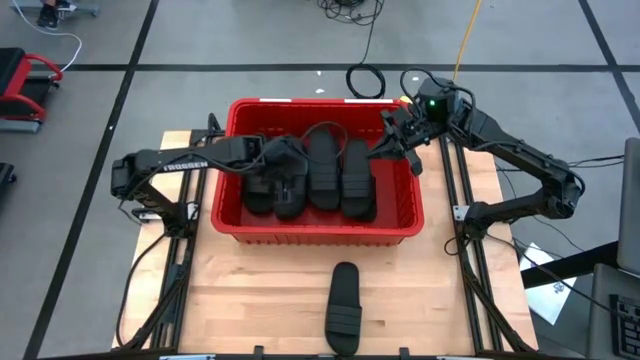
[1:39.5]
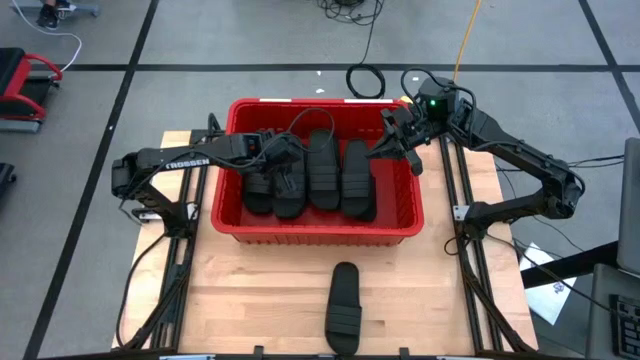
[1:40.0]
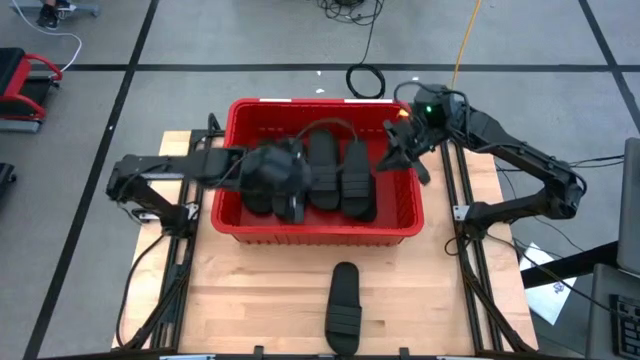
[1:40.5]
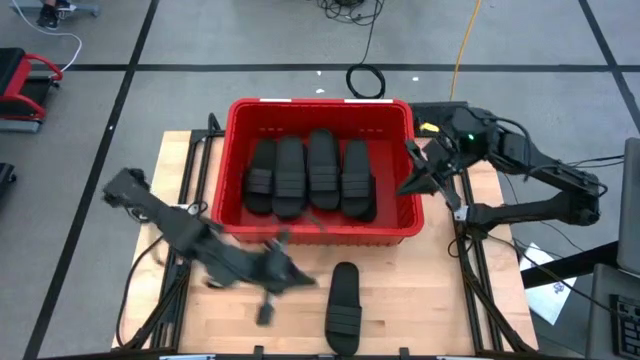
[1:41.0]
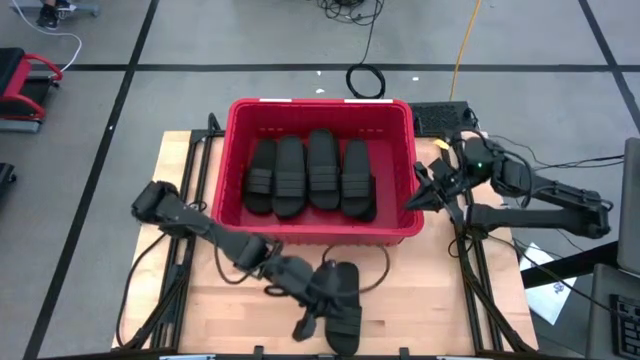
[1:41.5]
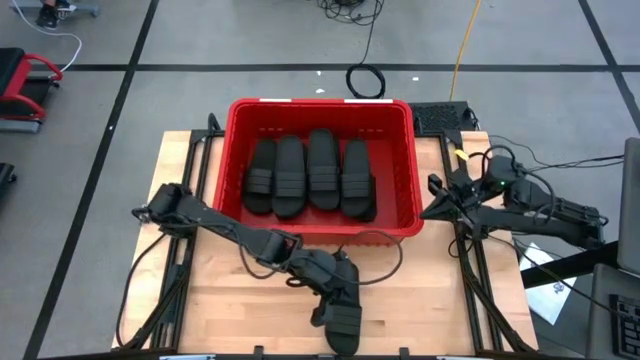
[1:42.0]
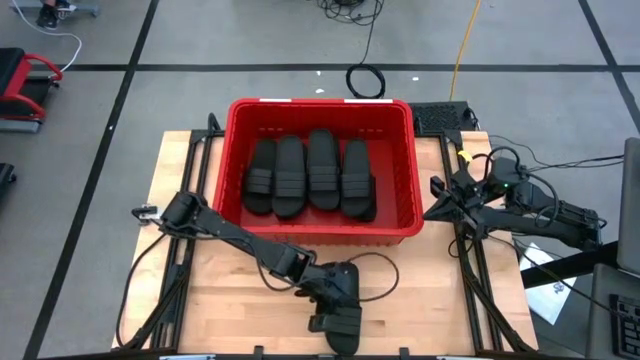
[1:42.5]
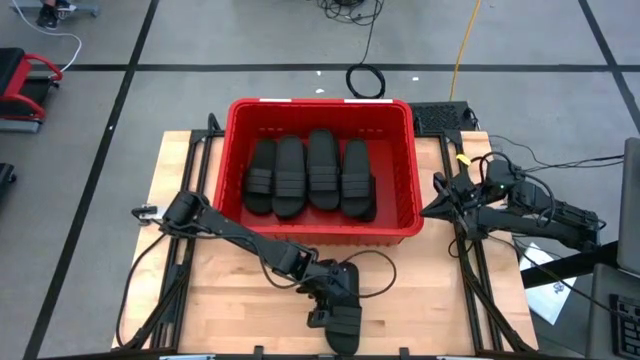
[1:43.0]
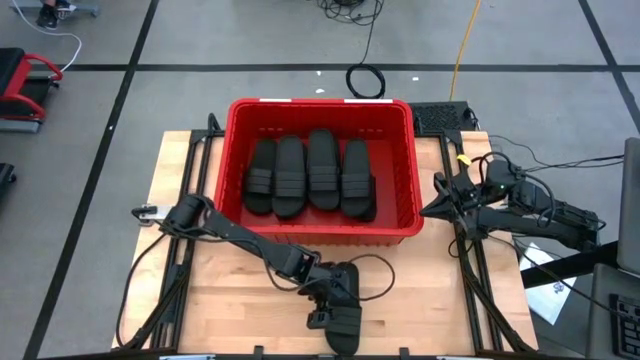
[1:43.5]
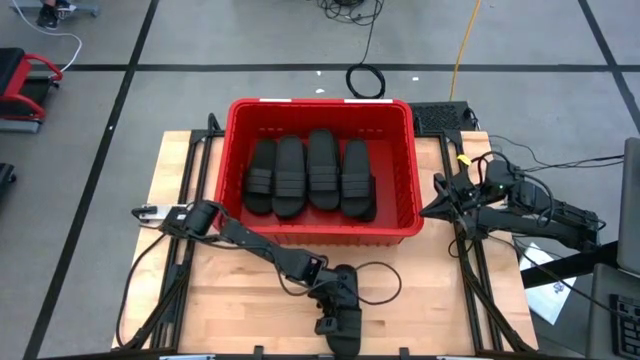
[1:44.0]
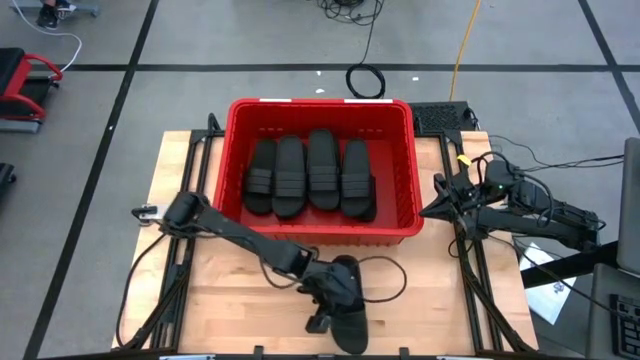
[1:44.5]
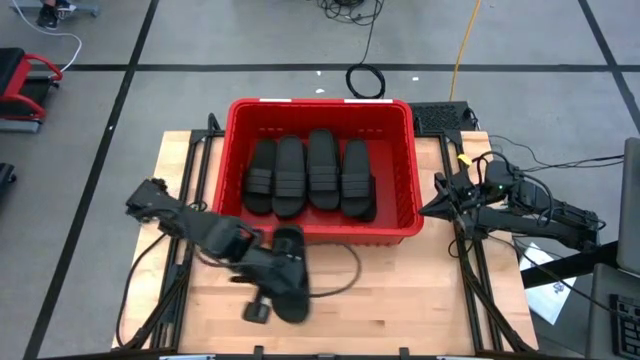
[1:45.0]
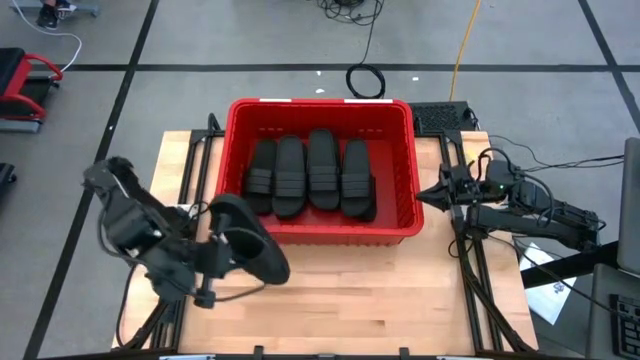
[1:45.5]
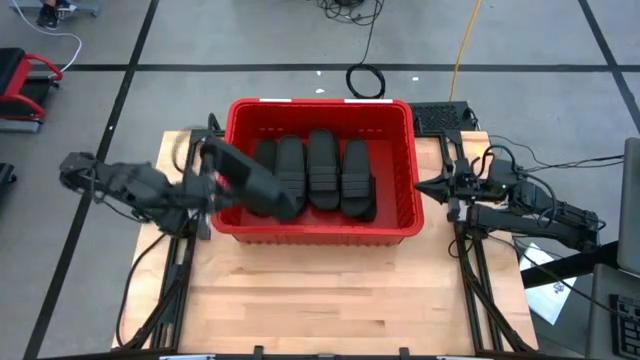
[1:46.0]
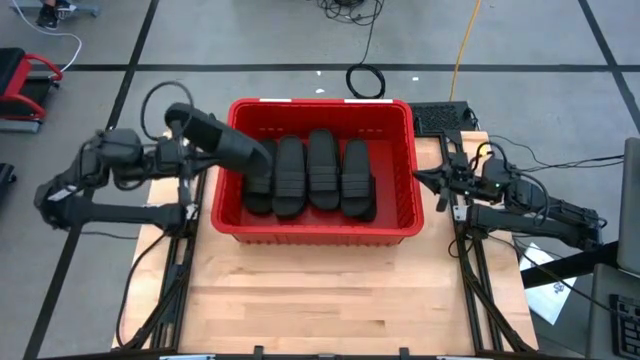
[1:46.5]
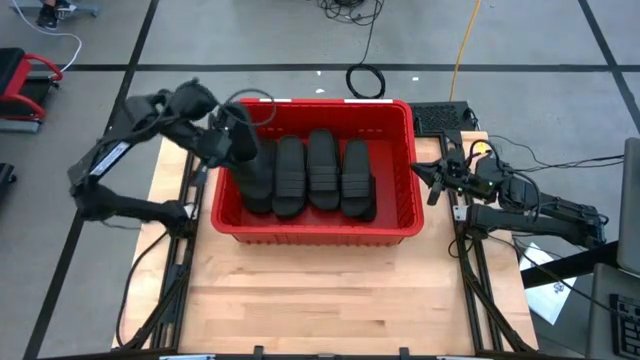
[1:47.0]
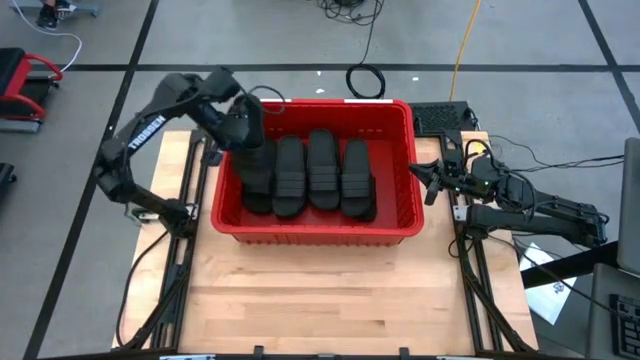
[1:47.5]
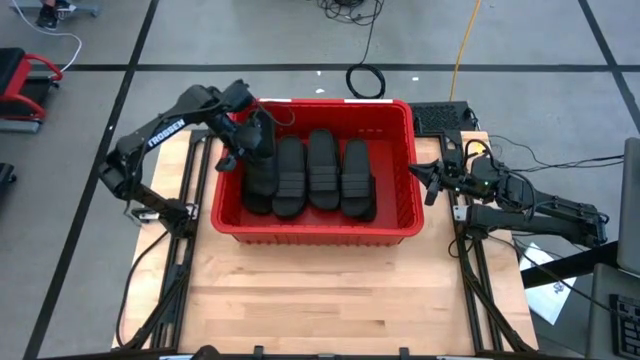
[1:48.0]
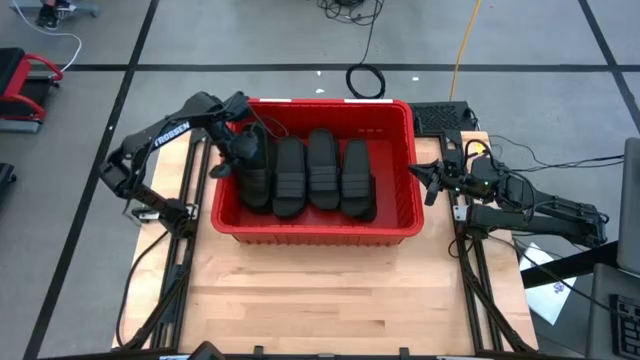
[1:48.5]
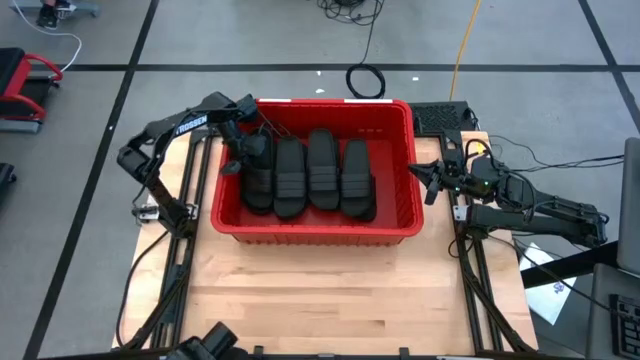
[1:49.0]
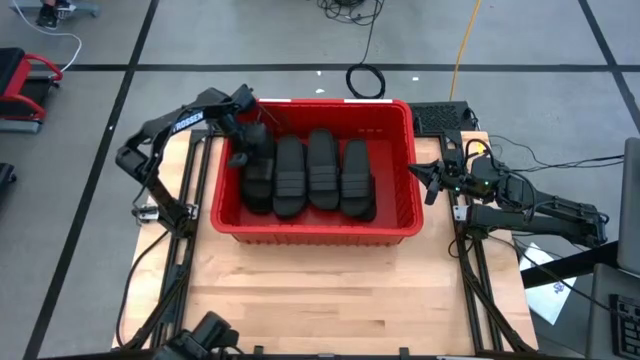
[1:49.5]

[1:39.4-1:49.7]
Task: Pick and place slides into bin
Put the black slide into the red bin

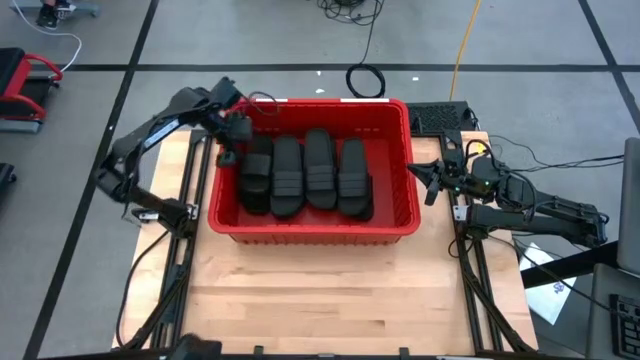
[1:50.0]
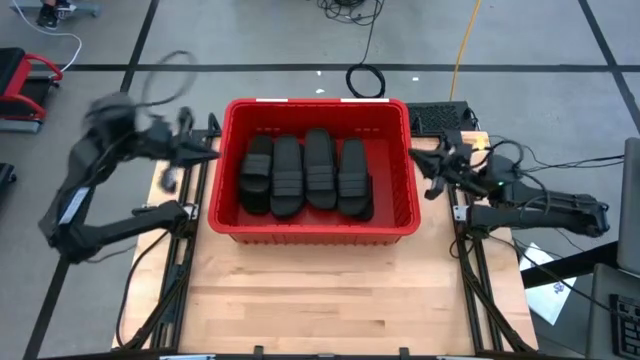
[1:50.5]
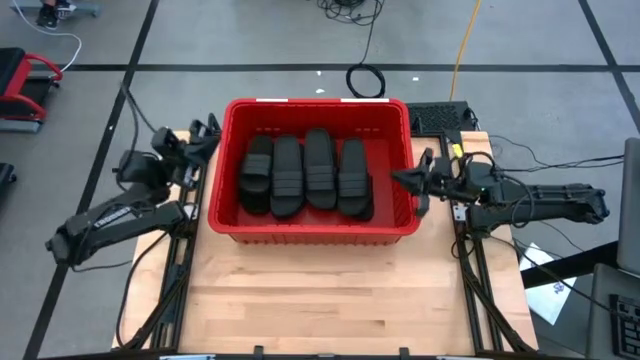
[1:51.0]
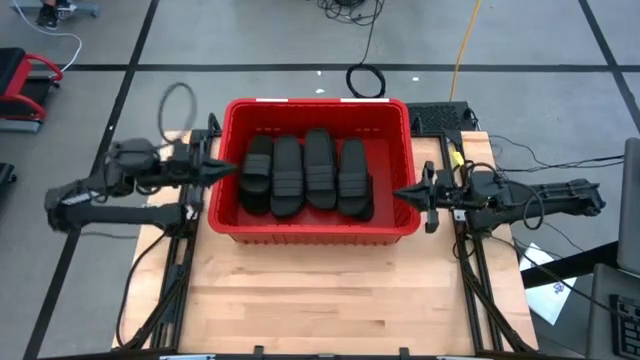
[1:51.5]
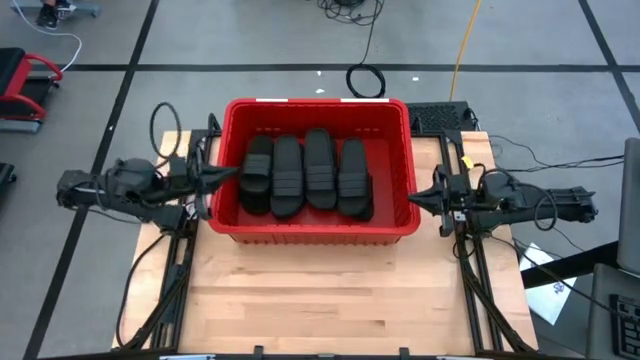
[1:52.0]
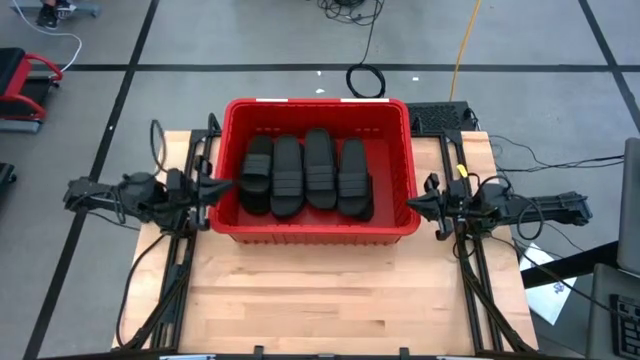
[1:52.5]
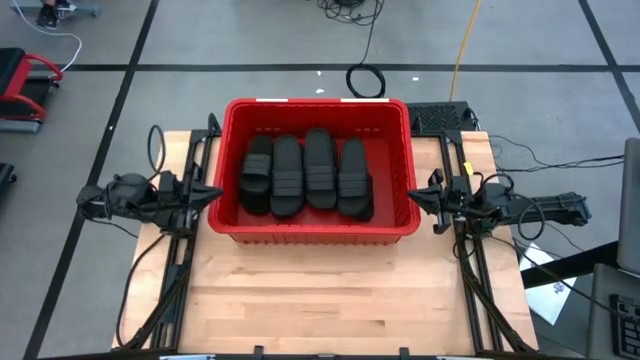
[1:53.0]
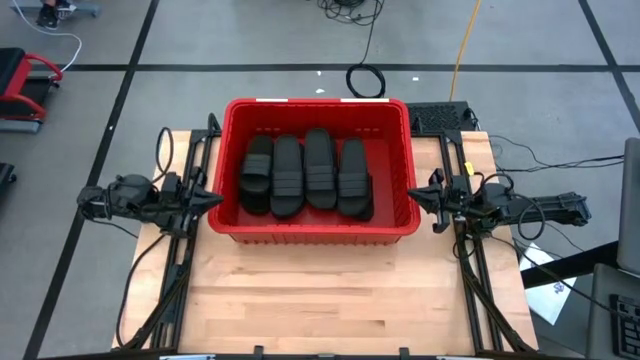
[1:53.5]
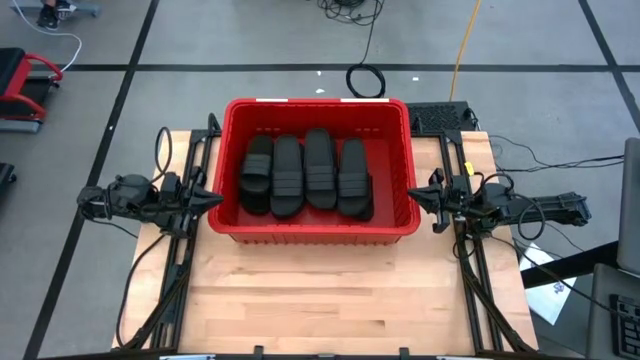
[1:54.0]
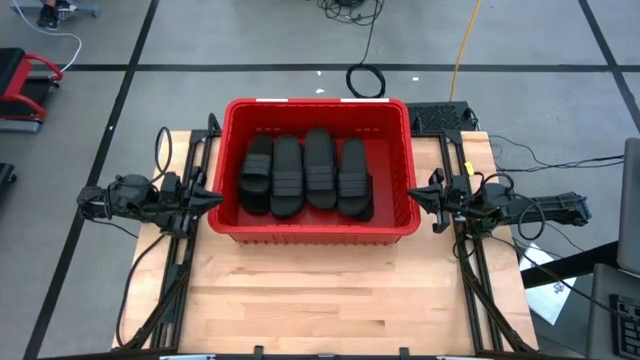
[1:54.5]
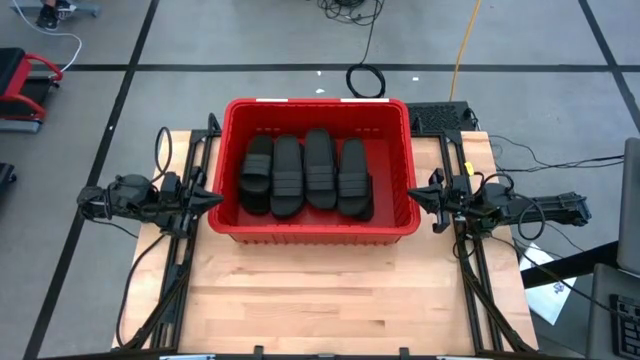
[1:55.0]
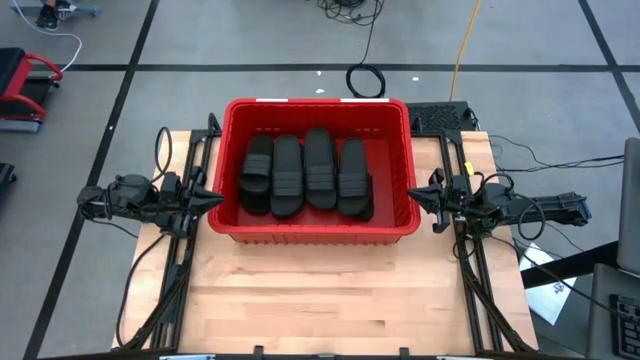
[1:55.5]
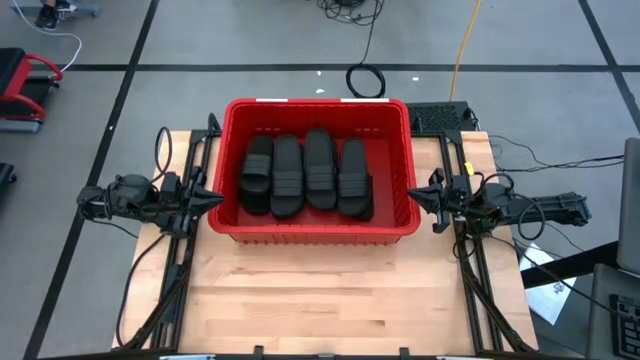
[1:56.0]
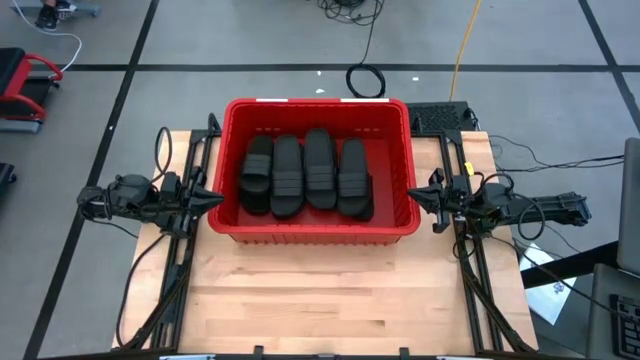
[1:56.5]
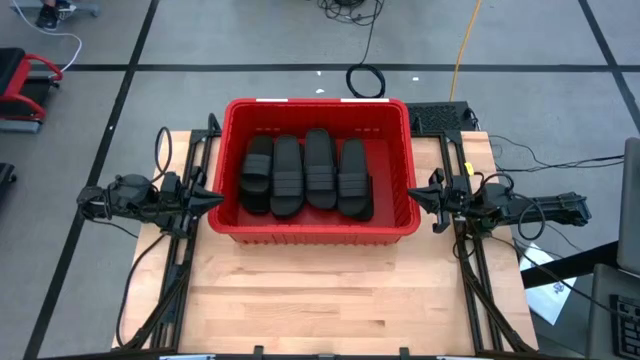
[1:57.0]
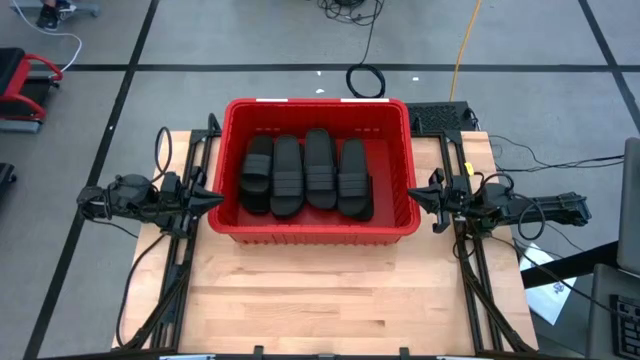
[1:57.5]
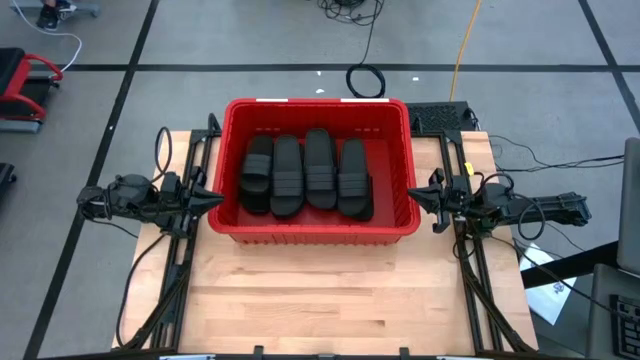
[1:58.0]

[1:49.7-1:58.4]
Return to Home Position

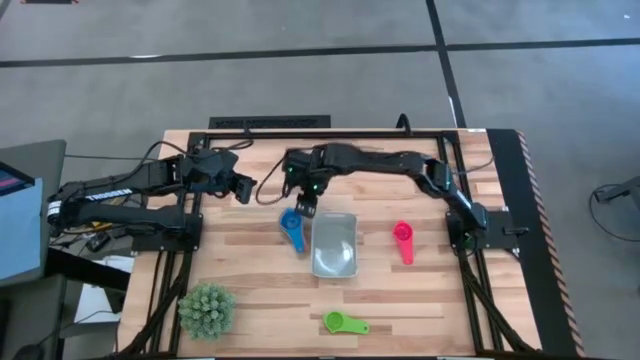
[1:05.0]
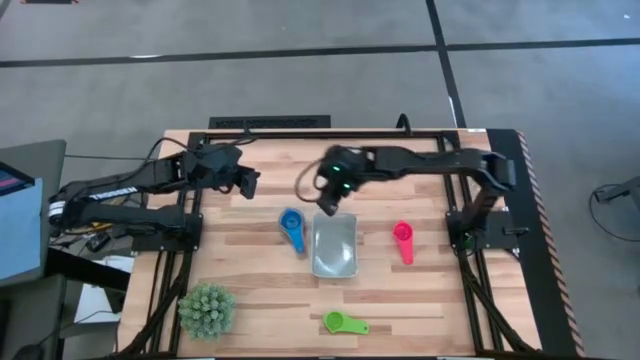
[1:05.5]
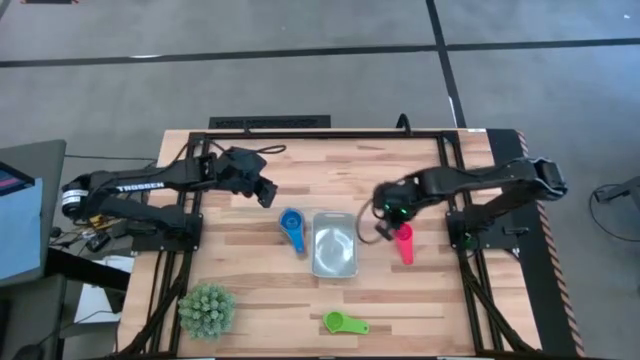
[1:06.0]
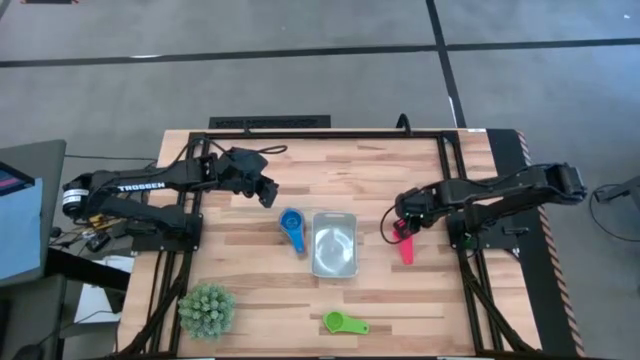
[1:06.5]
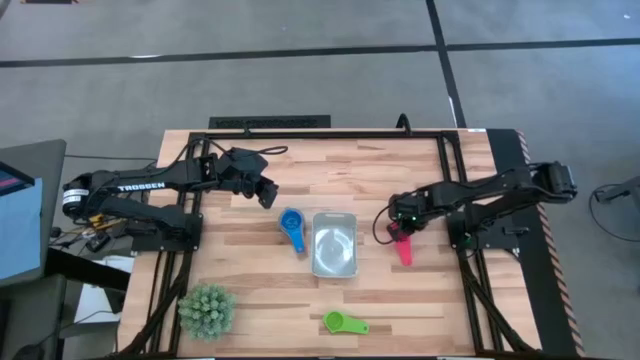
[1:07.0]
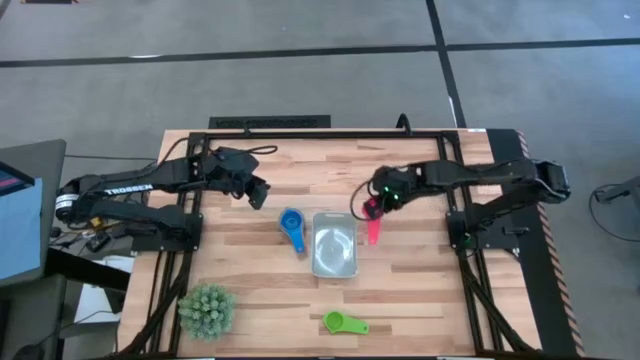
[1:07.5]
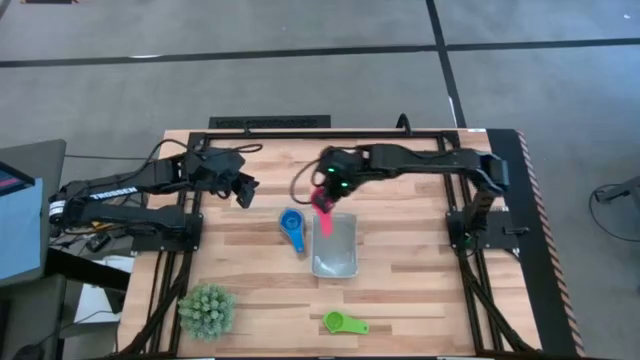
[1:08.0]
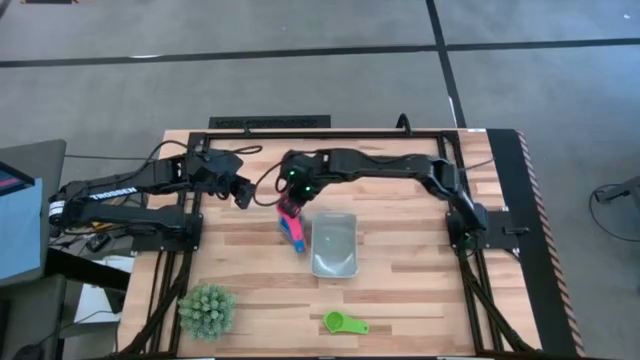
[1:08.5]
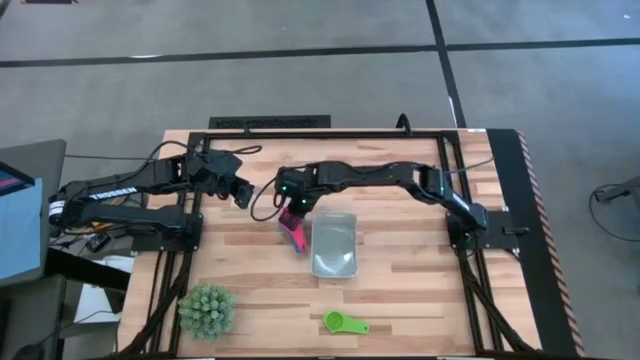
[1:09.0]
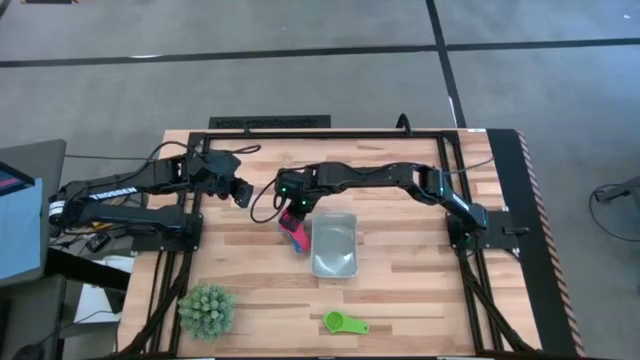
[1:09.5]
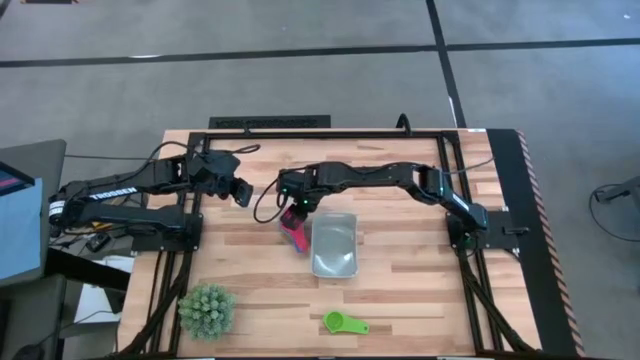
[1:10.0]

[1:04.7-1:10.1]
Task: Nest measuring cups in basket
Stack the red measuring cup on top of the blue measuring cup
